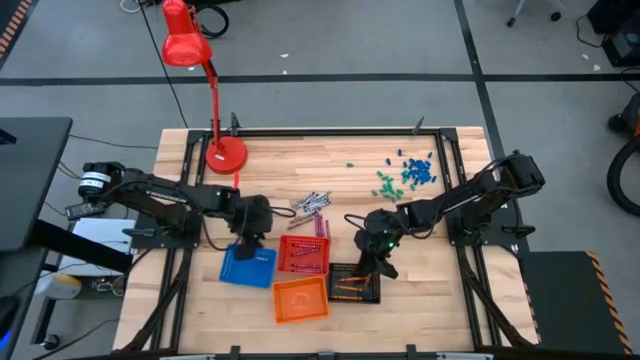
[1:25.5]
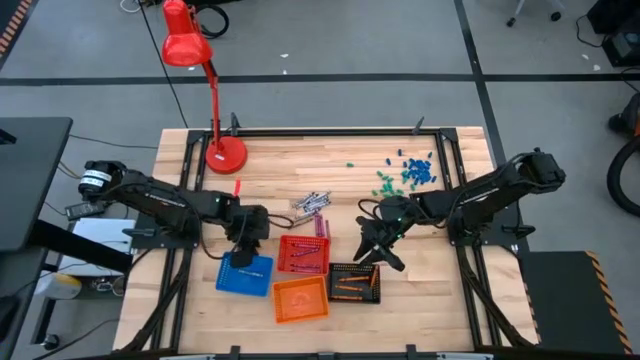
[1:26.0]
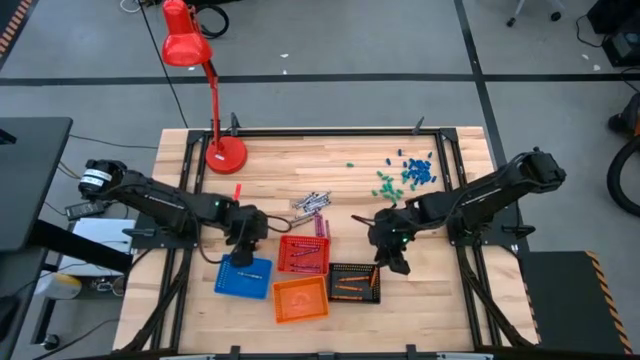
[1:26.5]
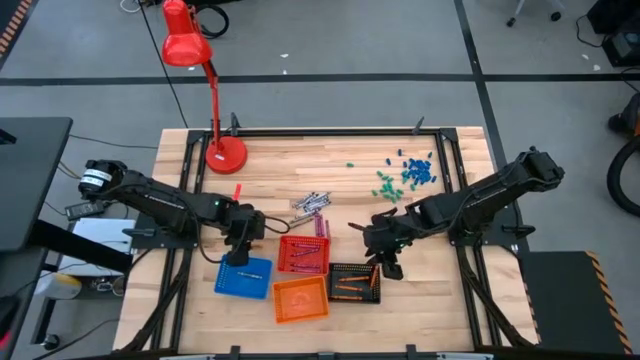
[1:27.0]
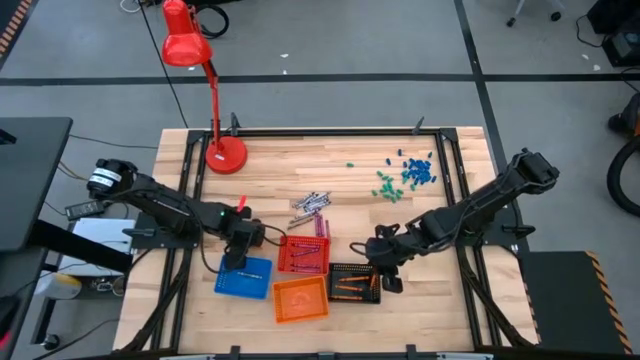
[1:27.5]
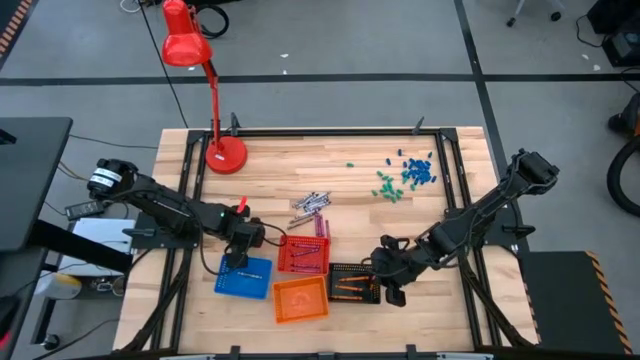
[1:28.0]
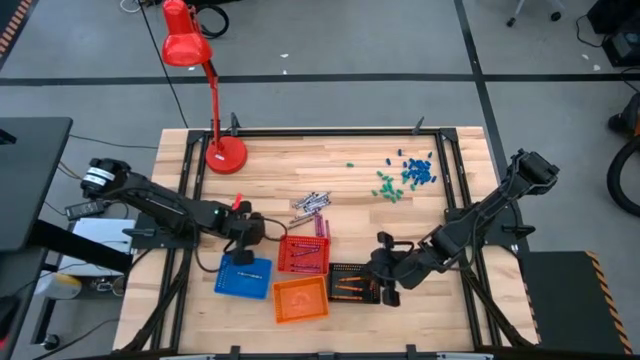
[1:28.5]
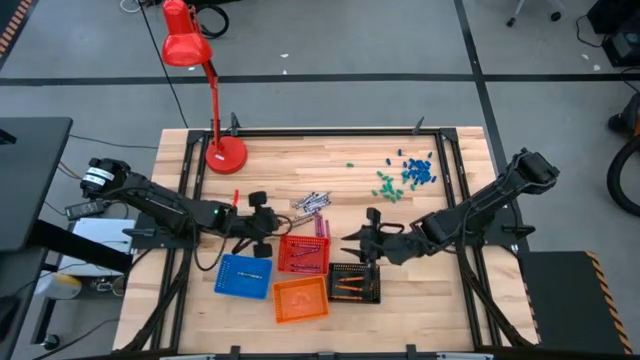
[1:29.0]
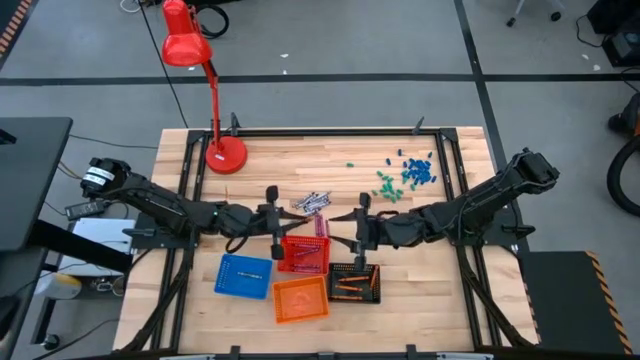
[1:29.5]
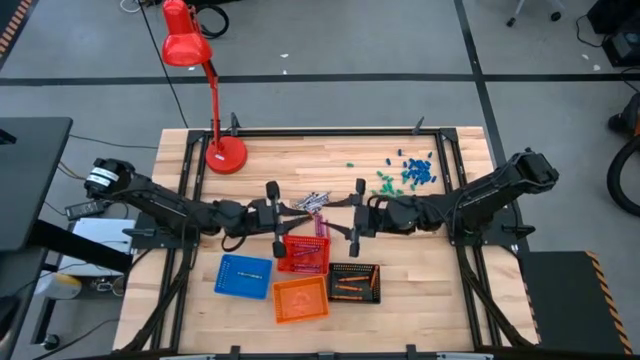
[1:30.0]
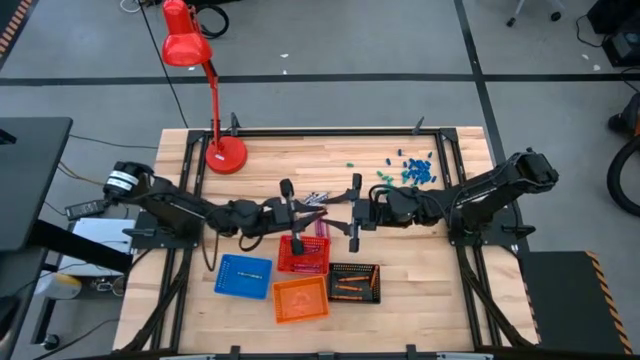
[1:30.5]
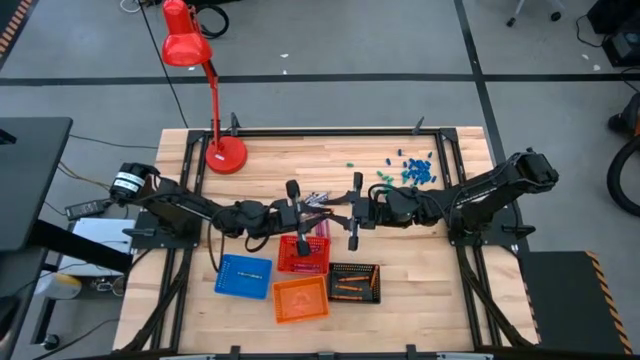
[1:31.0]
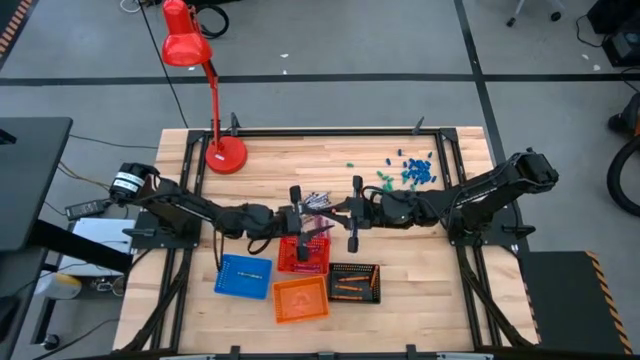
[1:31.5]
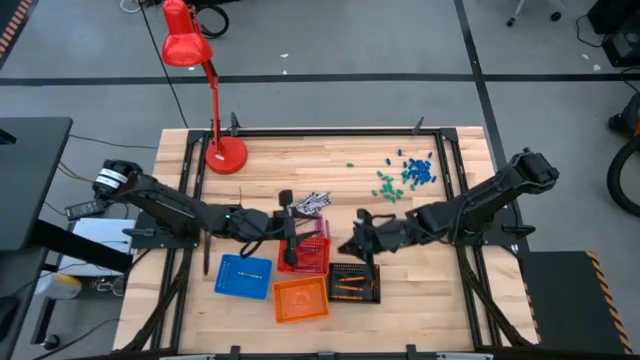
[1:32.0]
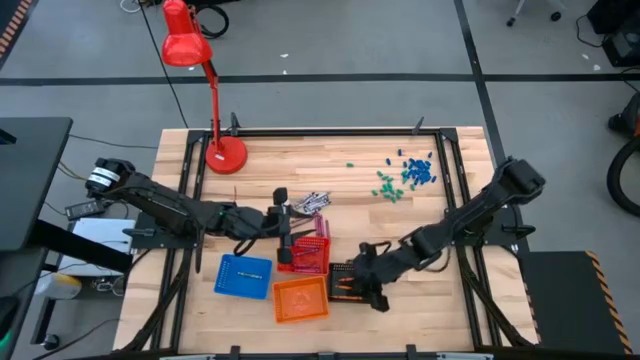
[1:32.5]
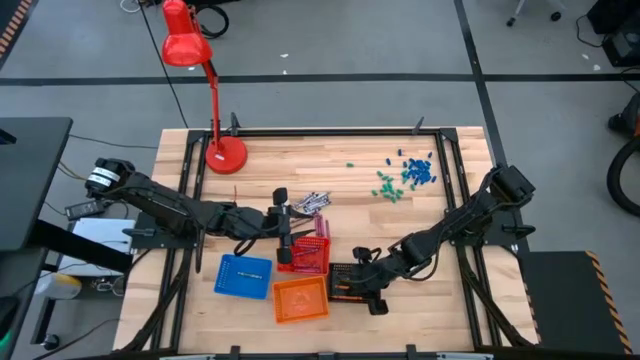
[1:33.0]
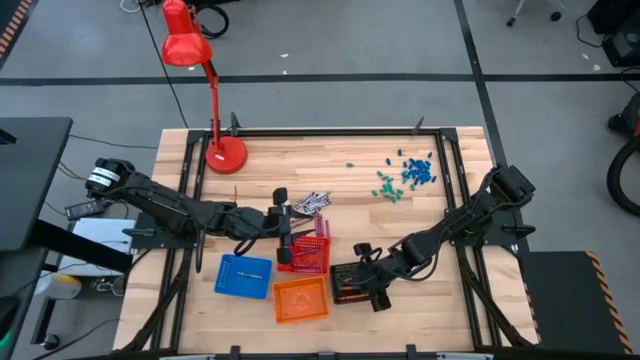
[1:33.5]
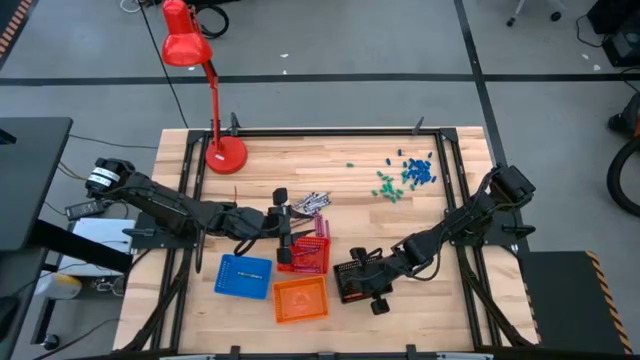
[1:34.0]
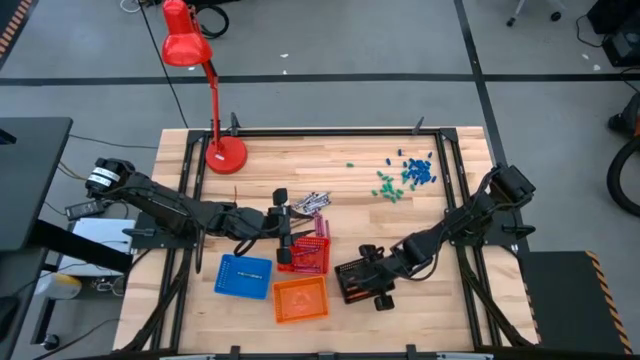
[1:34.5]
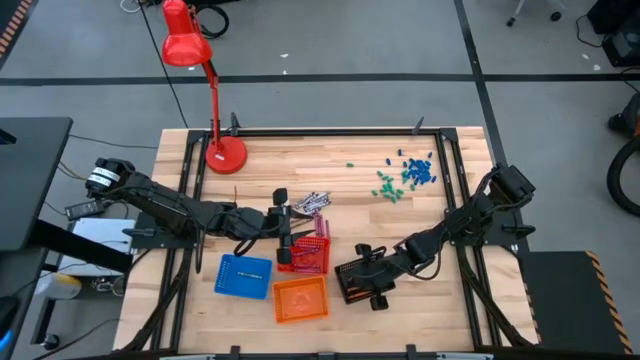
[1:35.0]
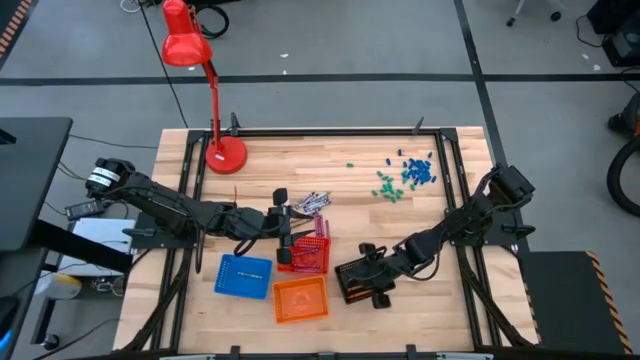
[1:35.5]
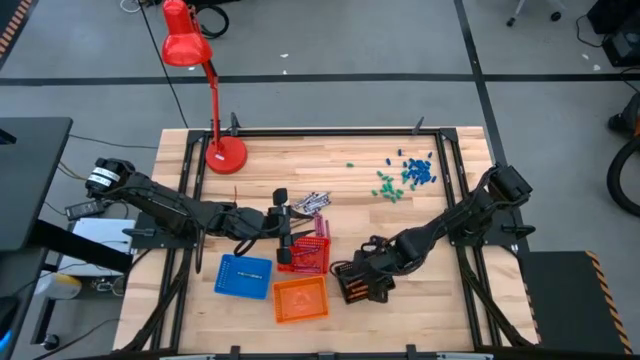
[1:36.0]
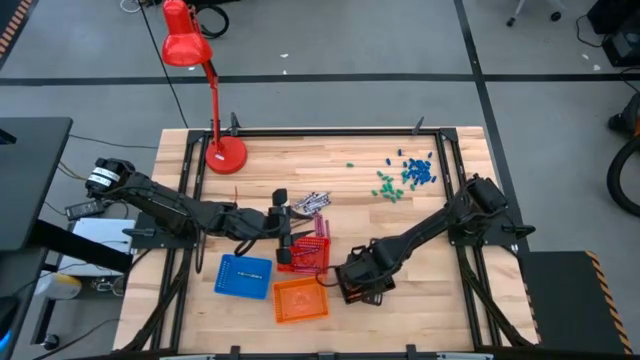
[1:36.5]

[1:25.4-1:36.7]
Task: Sort crayons
Put the orange crayon into the black bin

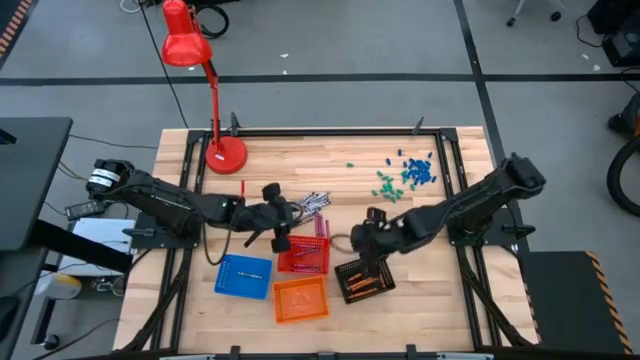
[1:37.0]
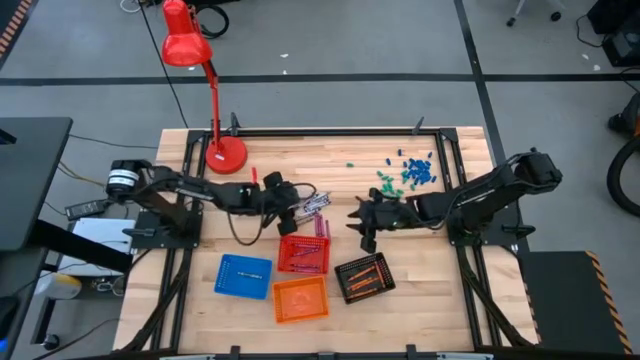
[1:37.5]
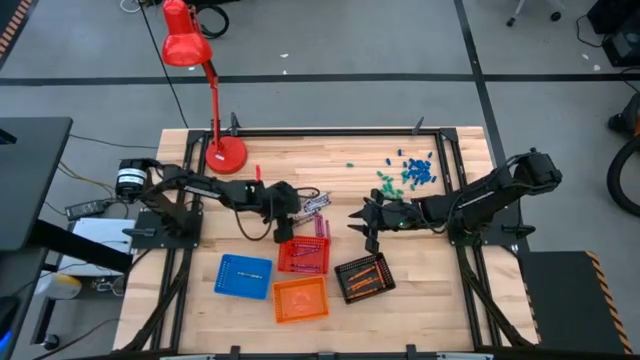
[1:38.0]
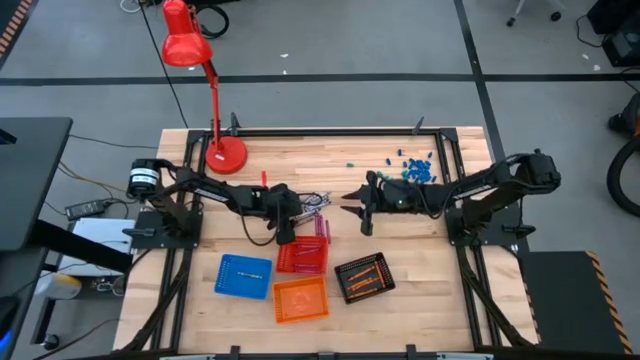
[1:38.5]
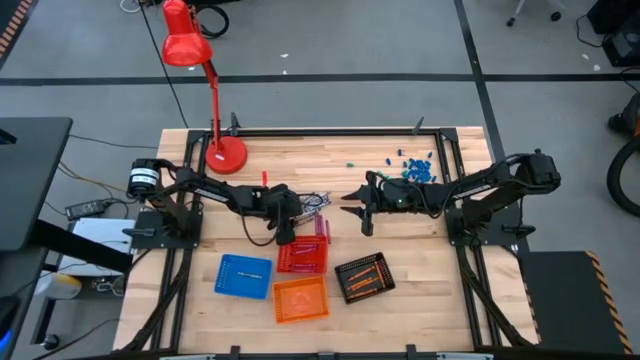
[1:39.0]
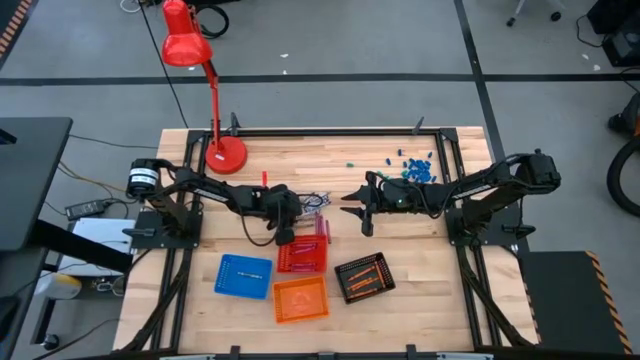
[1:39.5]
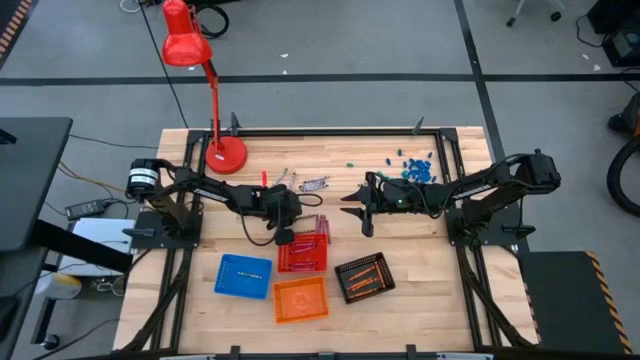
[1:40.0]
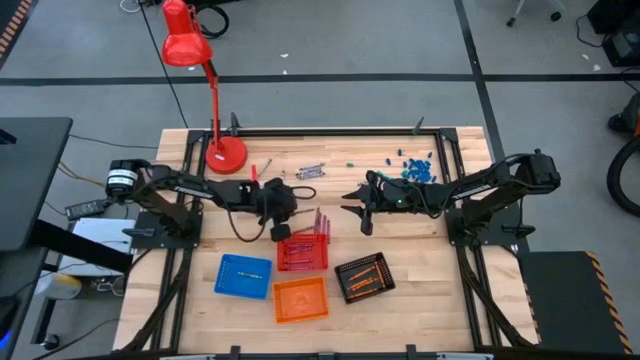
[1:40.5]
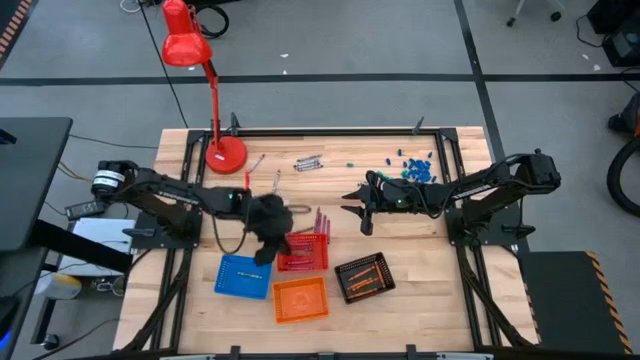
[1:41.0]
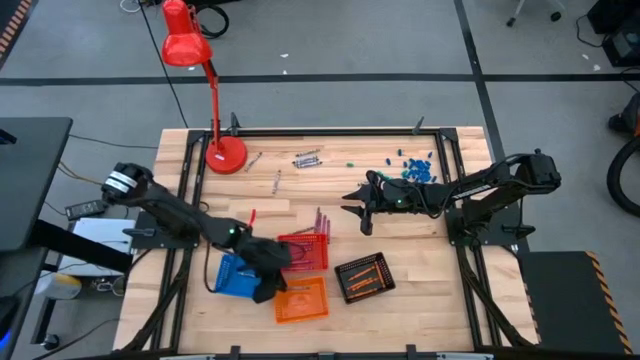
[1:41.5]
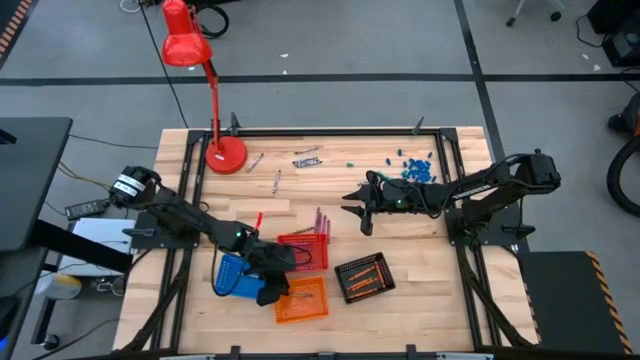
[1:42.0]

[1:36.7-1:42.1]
Put the brown crayon into the orange bin

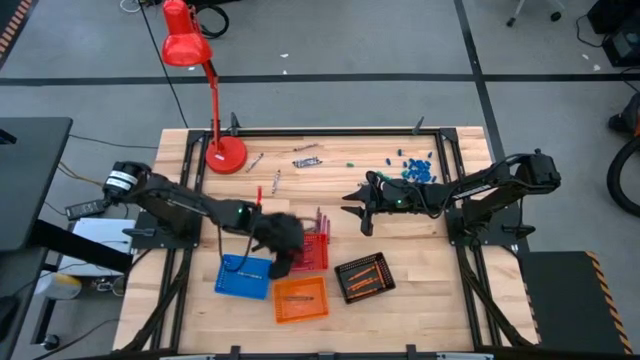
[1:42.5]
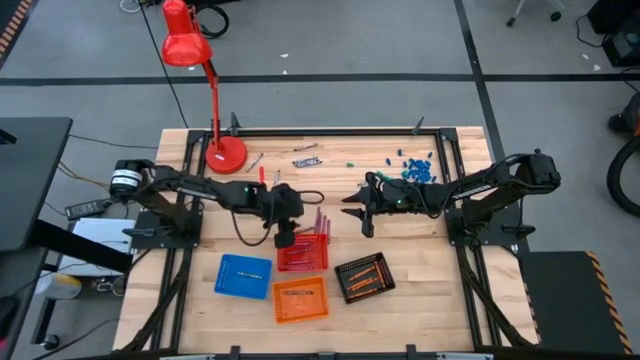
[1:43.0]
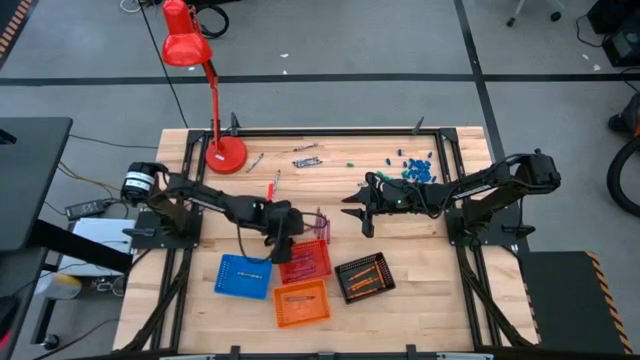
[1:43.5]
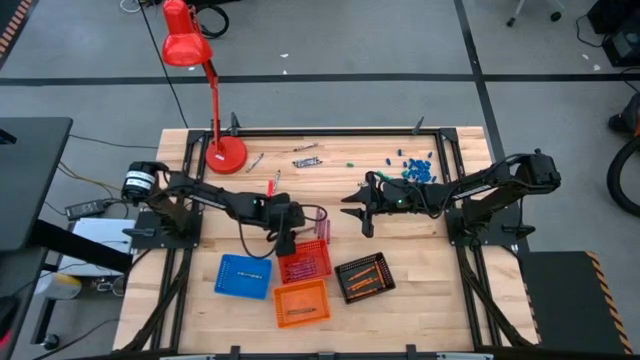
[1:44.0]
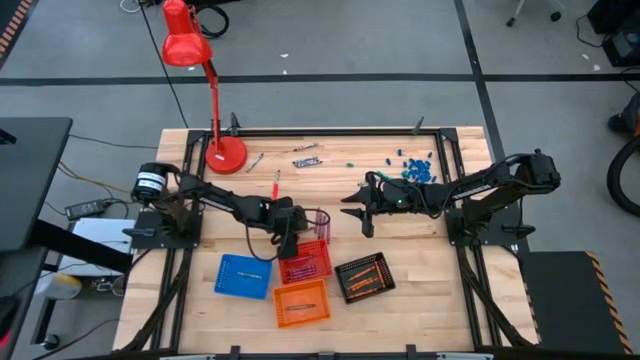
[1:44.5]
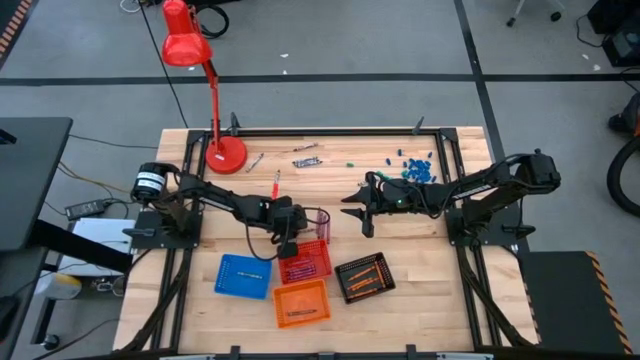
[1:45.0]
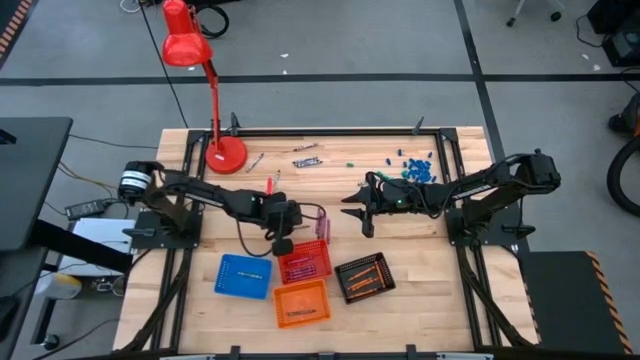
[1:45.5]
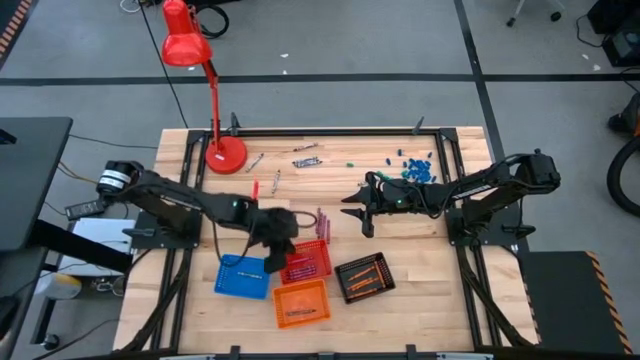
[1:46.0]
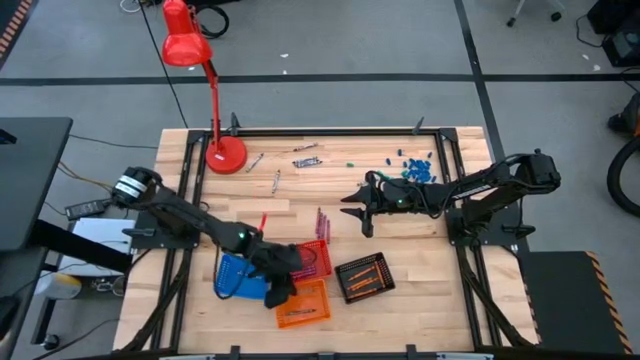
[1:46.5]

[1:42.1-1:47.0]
Put the brown crayon into the orange bin
